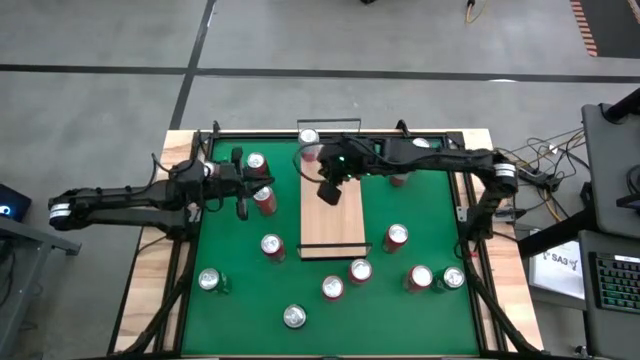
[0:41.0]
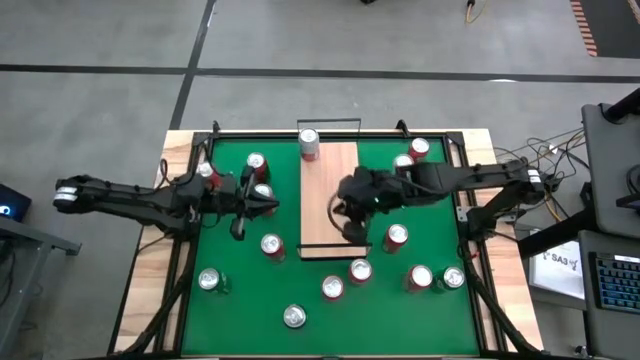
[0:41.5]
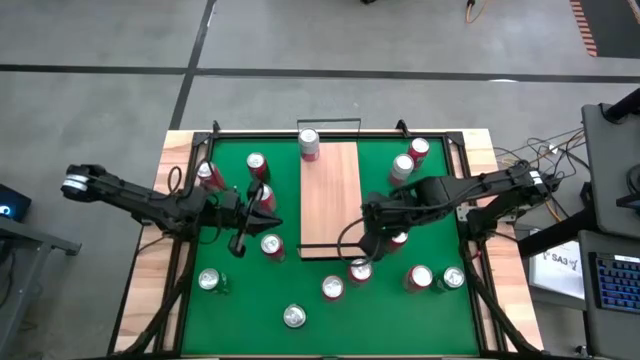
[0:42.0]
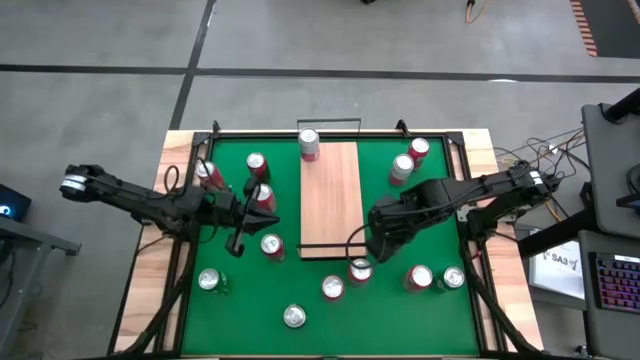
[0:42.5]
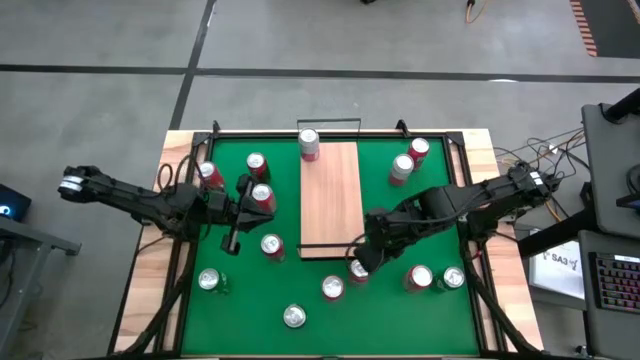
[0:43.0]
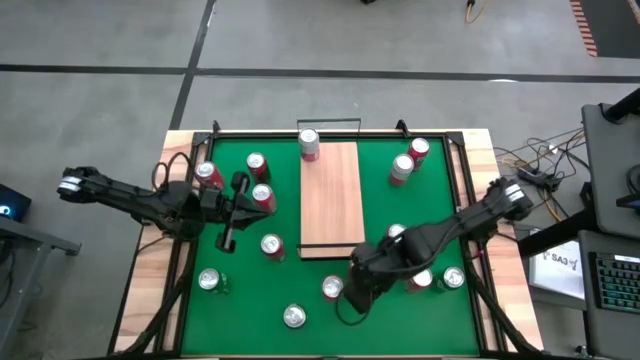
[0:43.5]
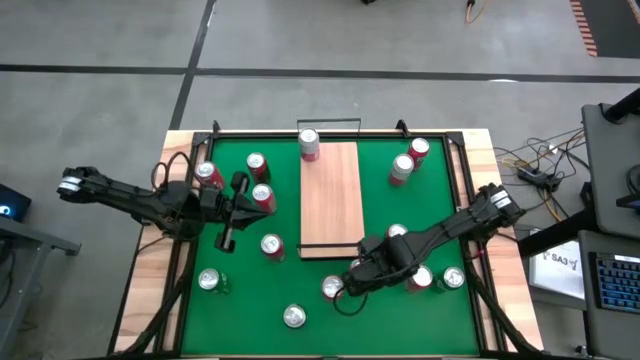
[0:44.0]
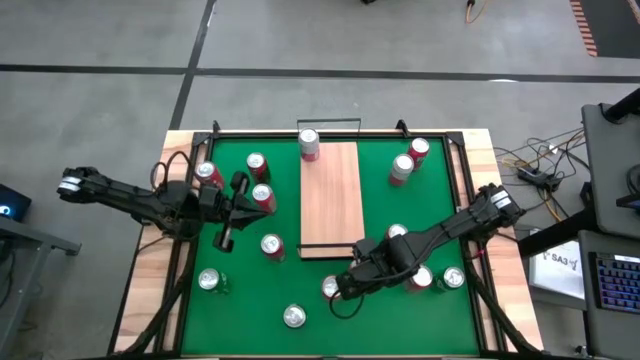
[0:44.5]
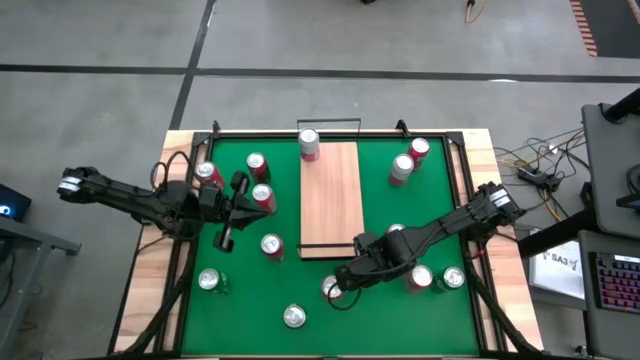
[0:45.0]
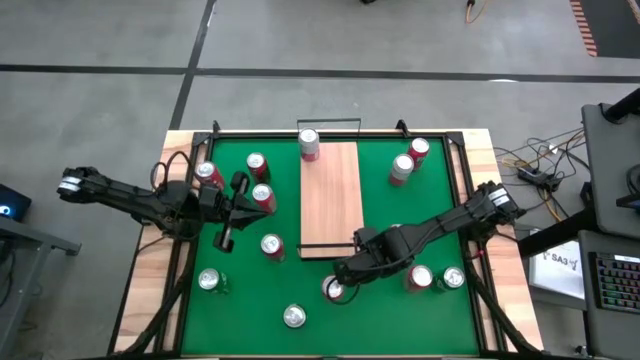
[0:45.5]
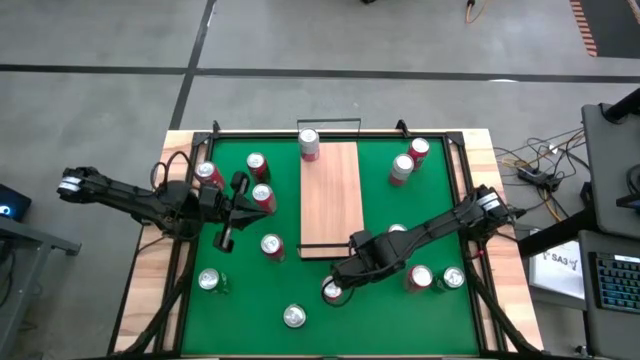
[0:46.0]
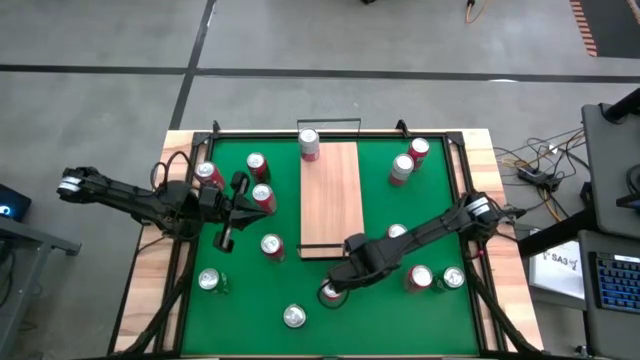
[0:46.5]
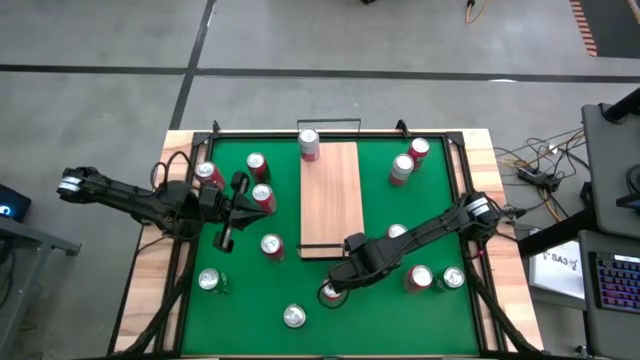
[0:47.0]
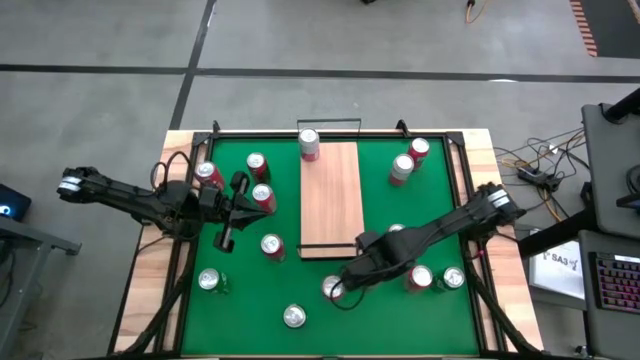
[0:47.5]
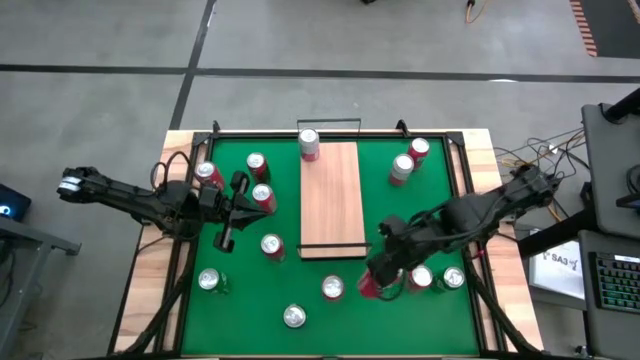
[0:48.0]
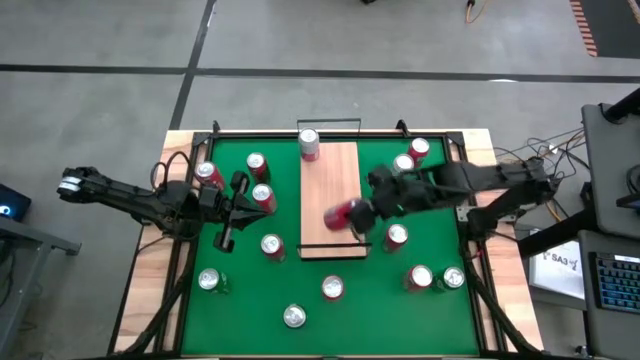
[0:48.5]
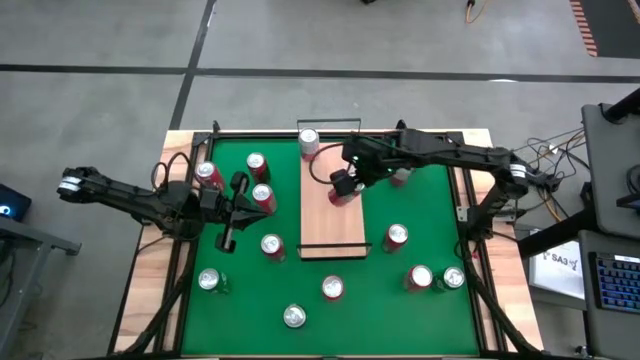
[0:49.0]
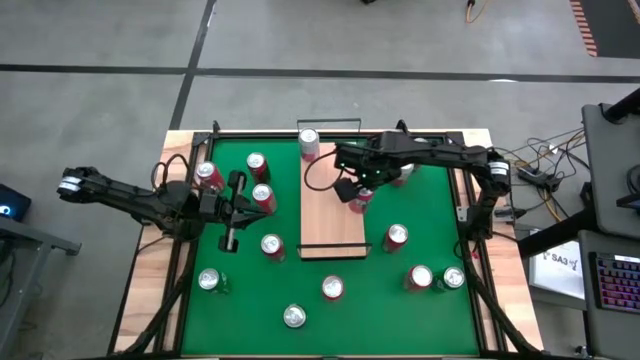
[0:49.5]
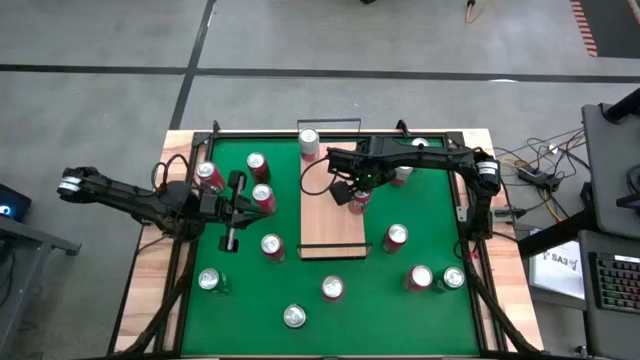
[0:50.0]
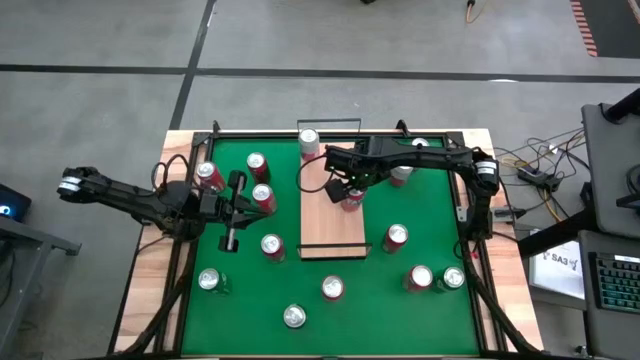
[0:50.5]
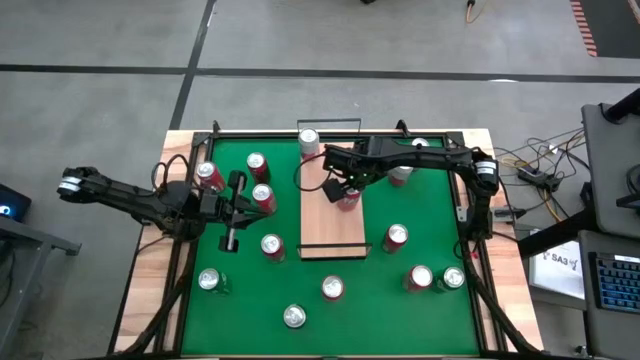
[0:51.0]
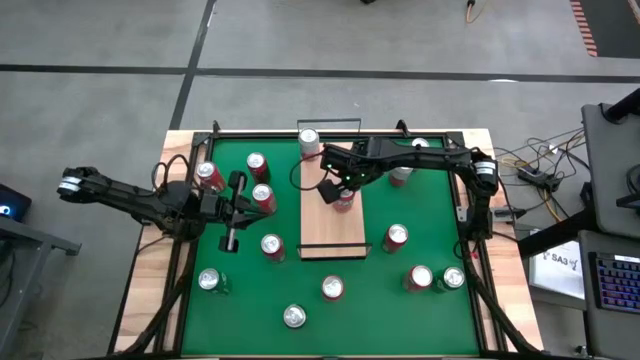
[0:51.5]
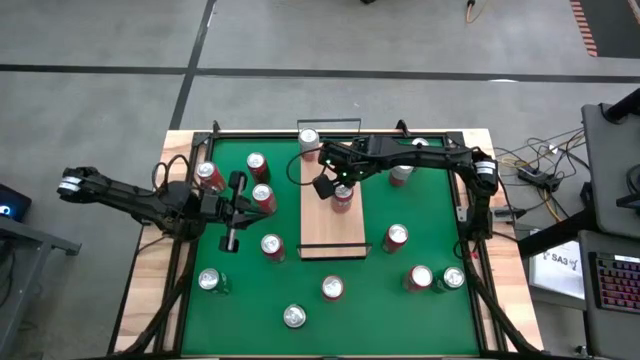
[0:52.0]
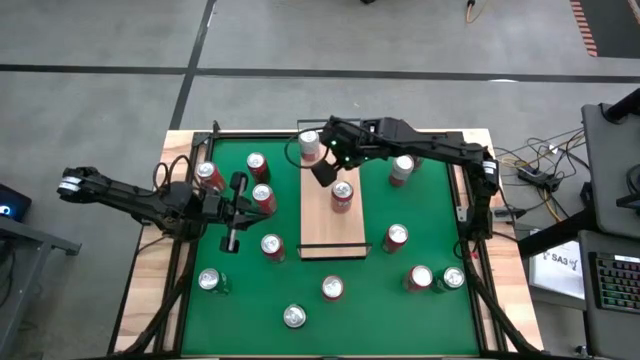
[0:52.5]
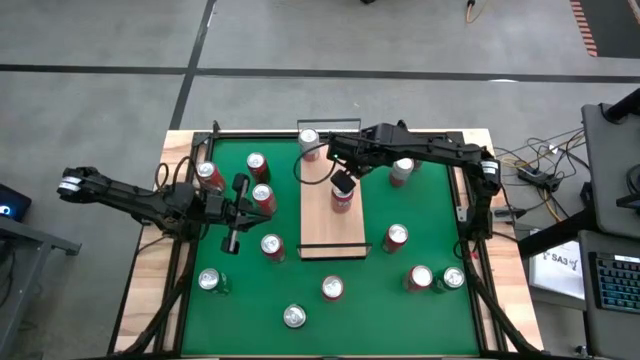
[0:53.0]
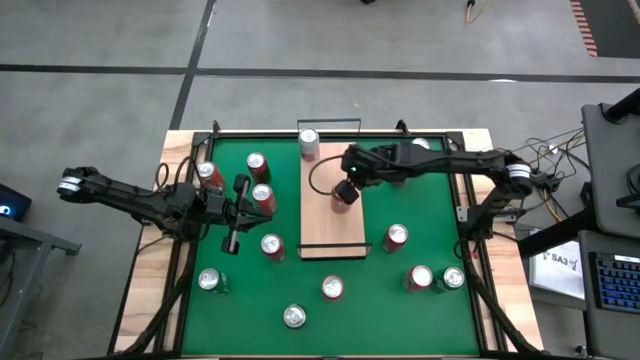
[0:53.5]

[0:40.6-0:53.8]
Task: Place canned beverage on shelf
Put the orange soda can on the shelf

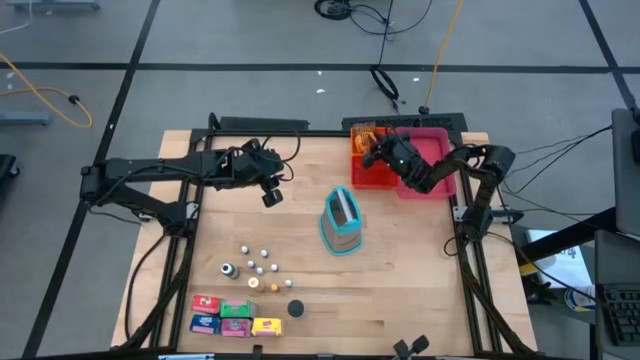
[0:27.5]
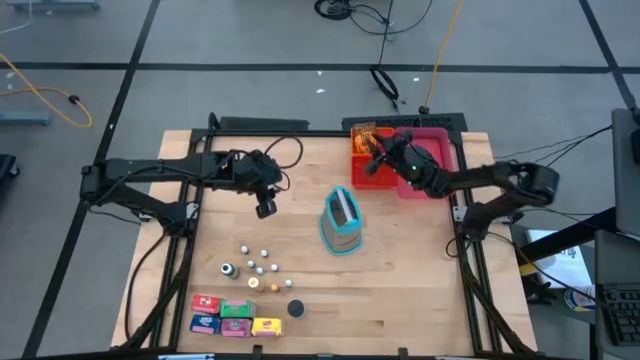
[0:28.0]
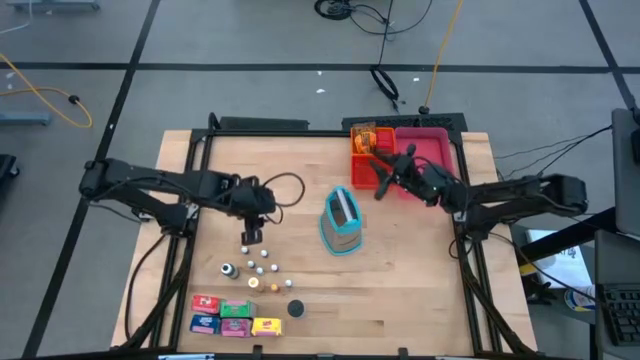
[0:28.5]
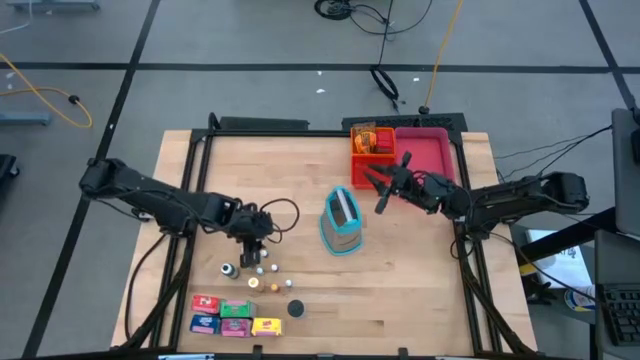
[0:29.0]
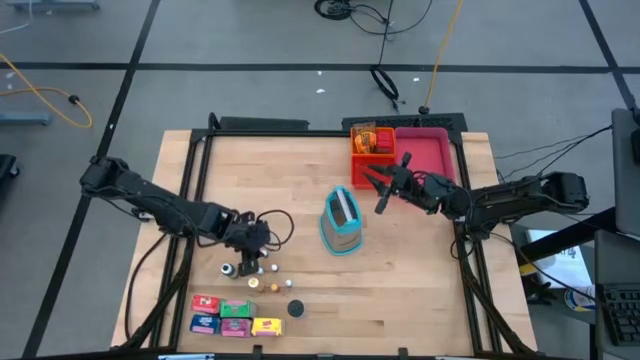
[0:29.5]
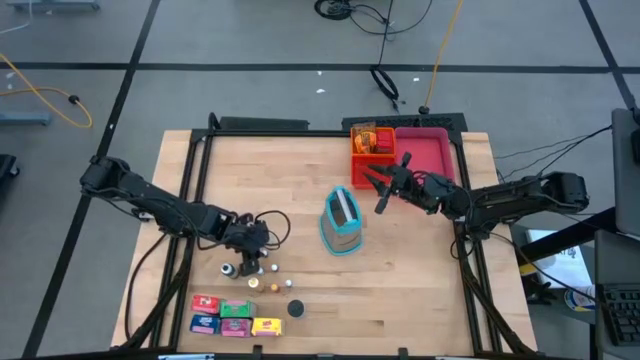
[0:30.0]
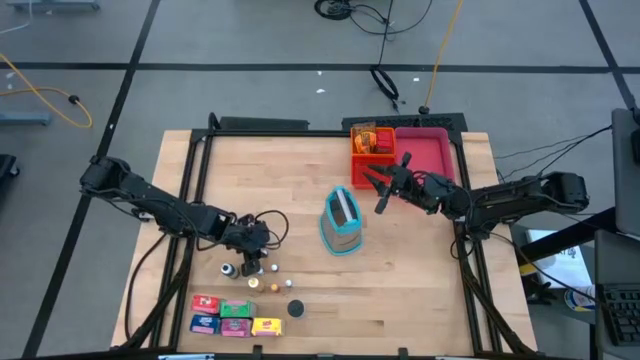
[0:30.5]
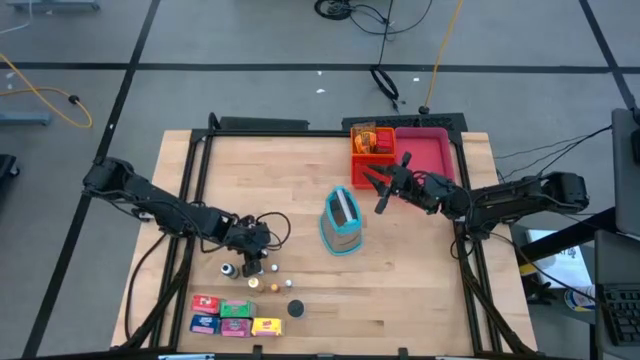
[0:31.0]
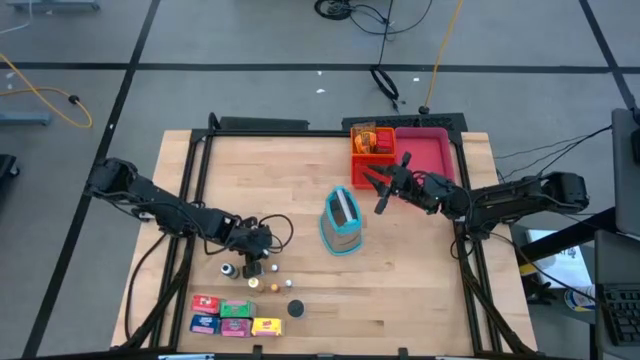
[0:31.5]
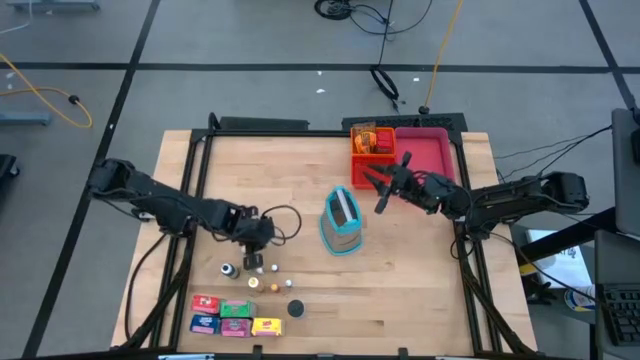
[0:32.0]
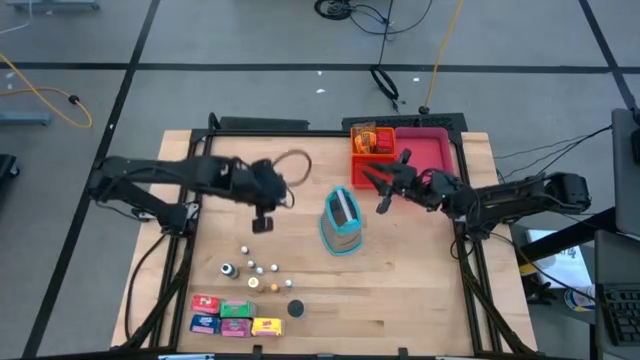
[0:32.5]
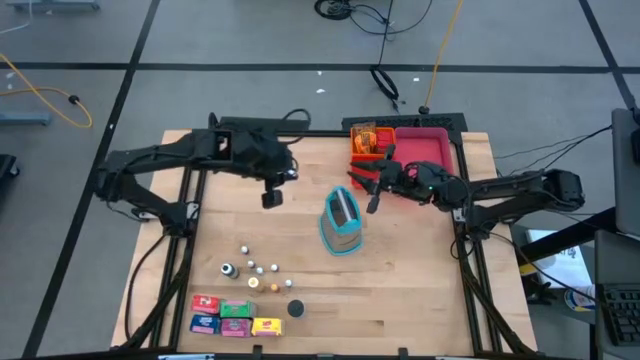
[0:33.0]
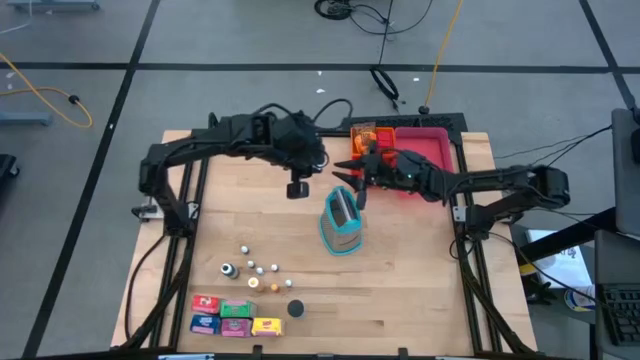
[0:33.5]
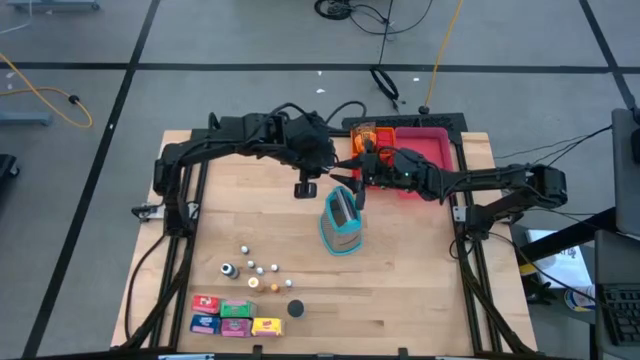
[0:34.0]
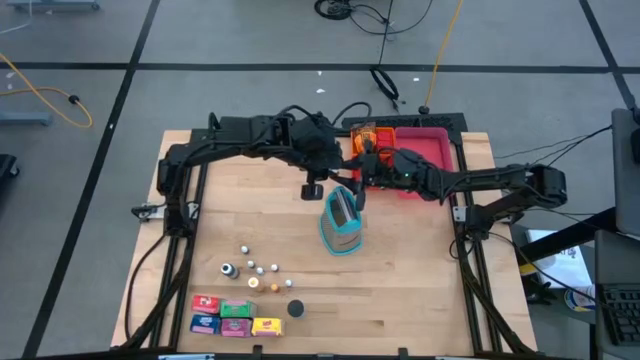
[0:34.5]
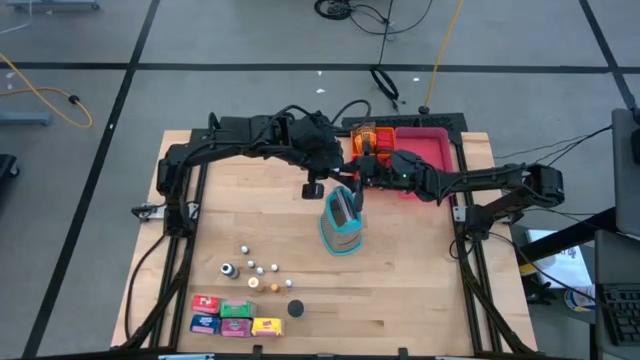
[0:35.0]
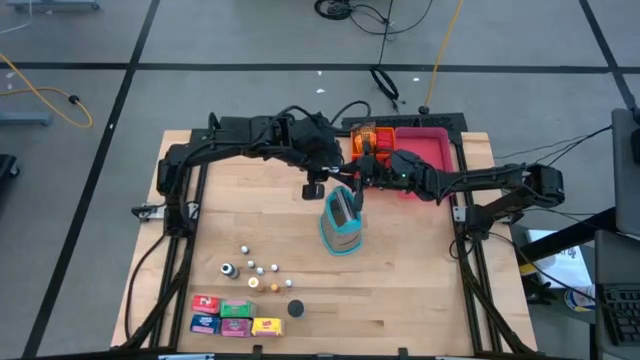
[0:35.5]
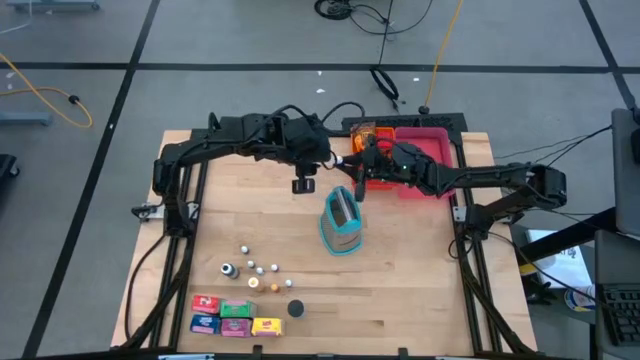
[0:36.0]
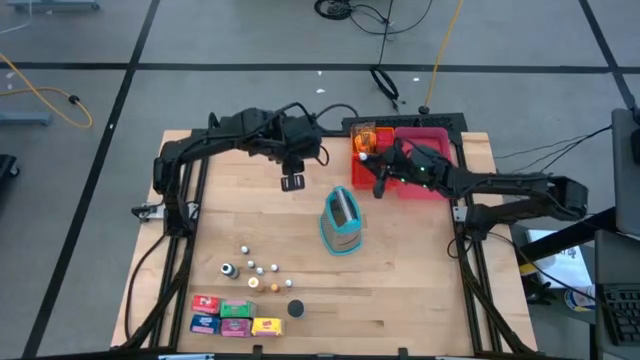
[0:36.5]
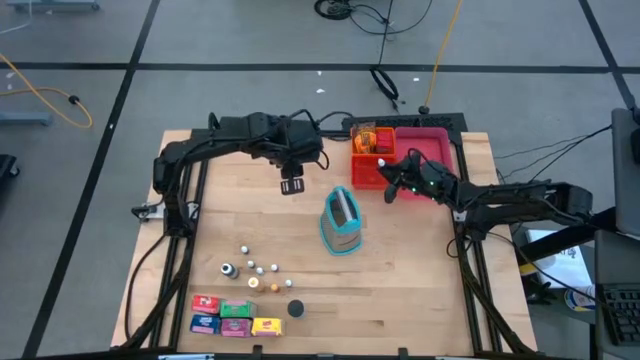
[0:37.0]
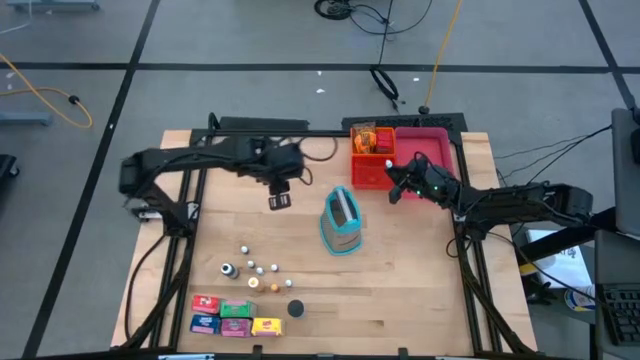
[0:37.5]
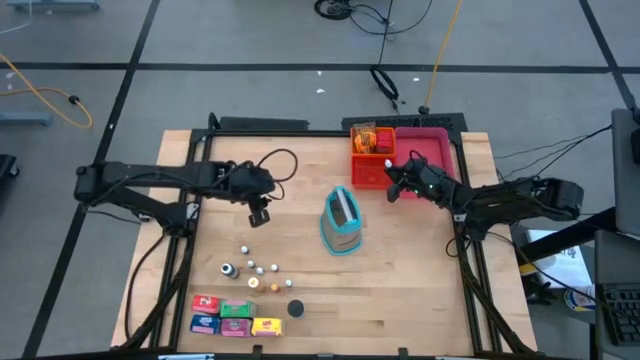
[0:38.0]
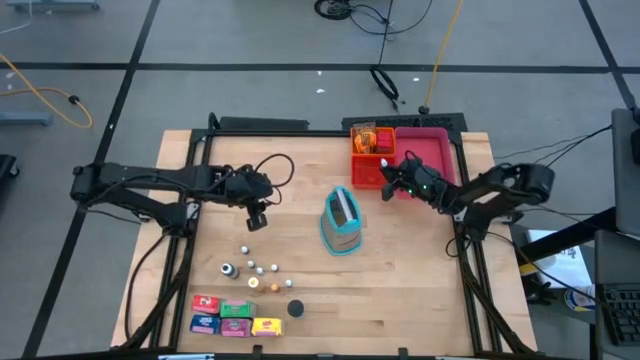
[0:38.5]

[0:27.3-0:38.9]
Task: Pick & Place Kitchen Items
Put the small purple food coloring bottle into the red bin
